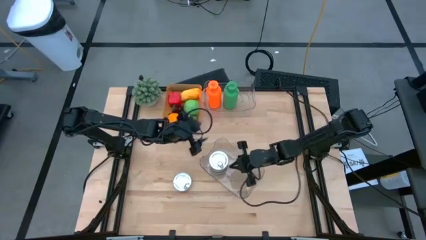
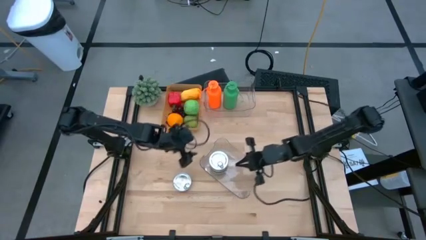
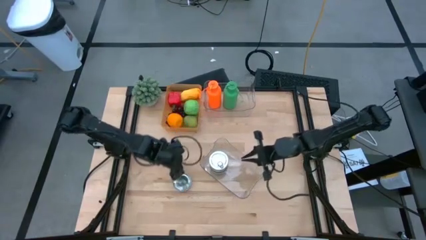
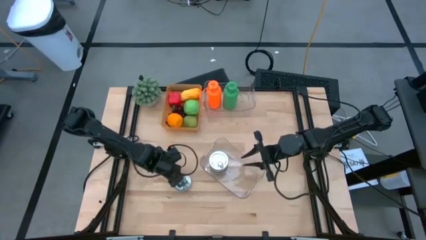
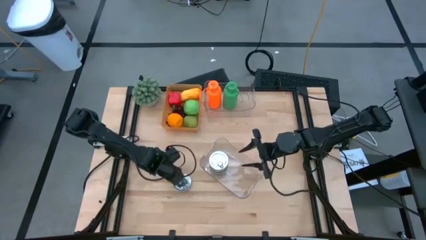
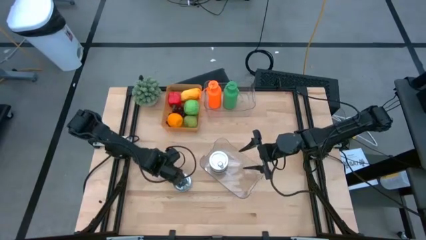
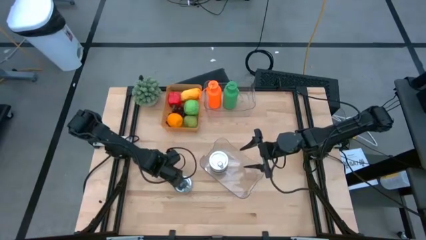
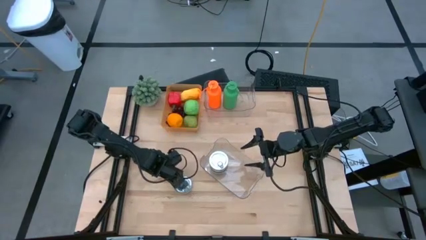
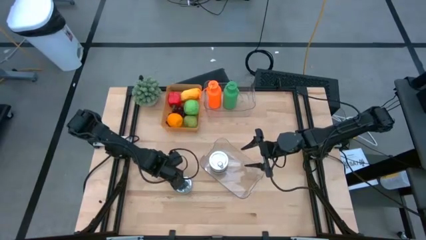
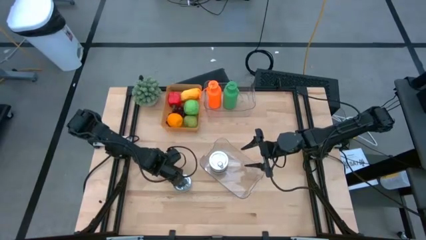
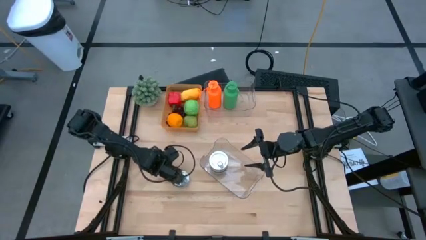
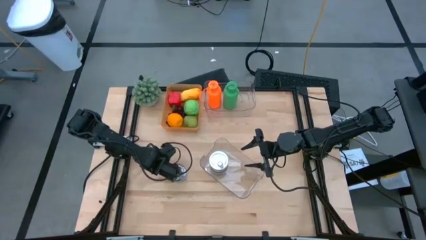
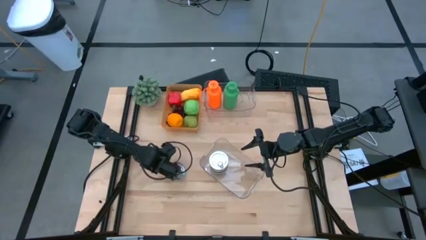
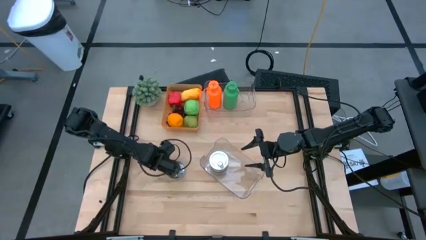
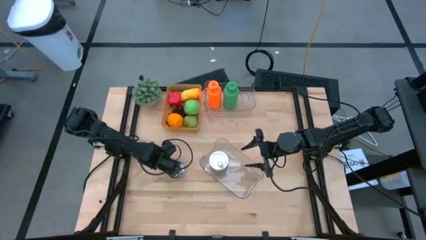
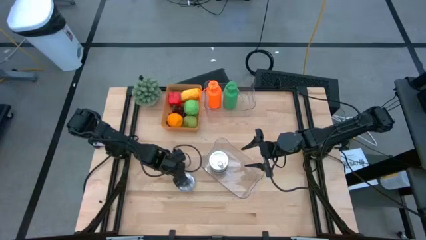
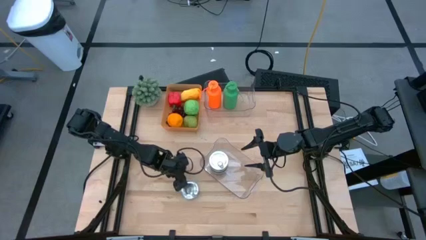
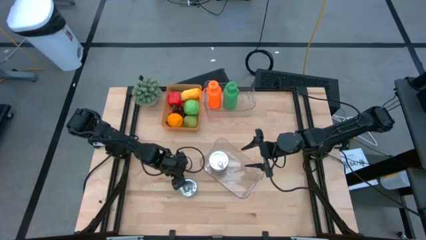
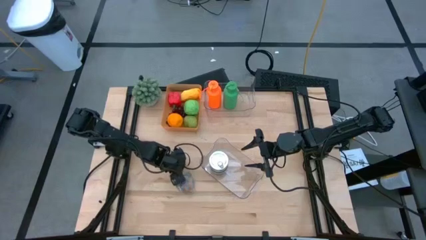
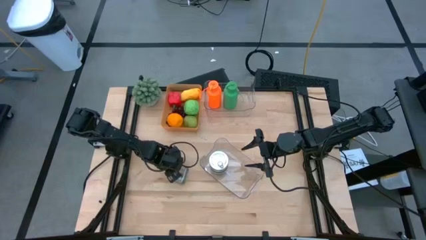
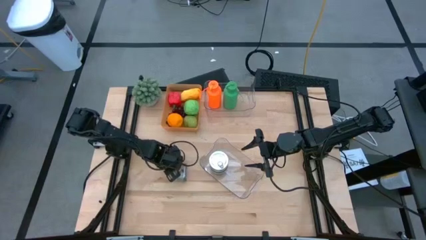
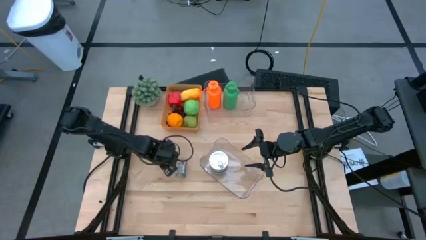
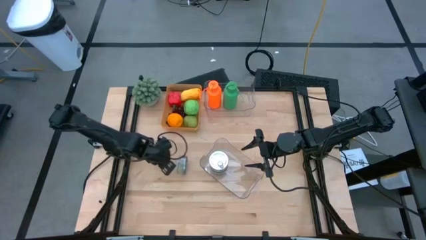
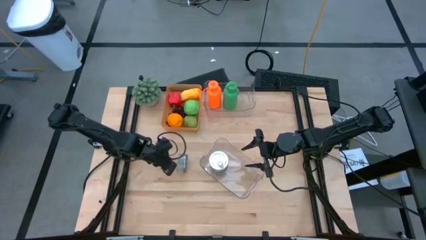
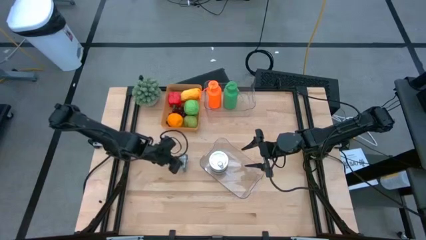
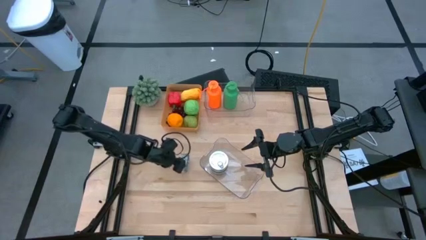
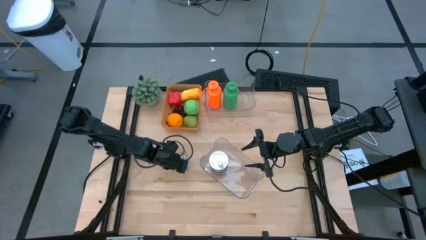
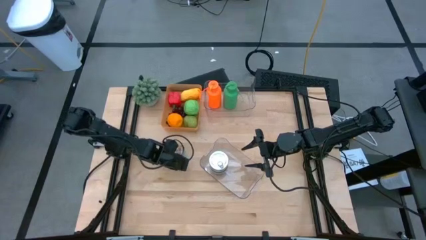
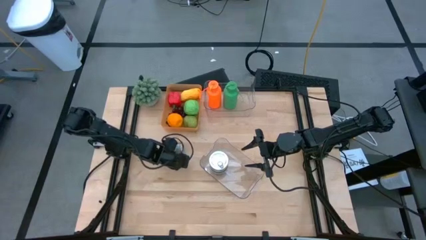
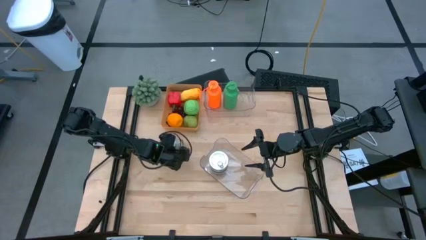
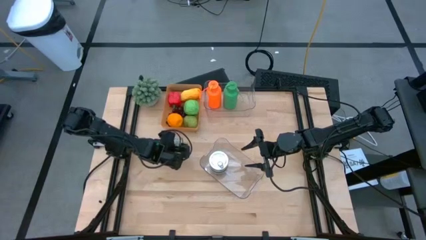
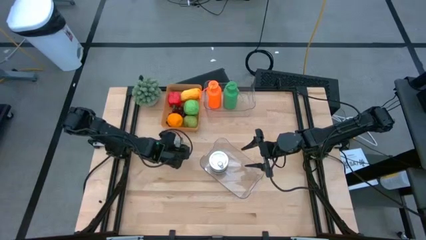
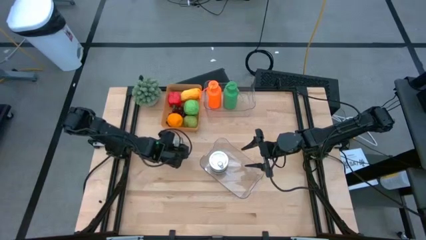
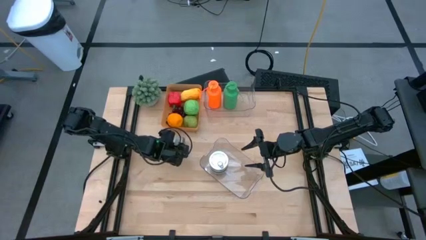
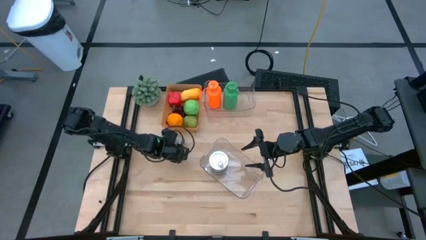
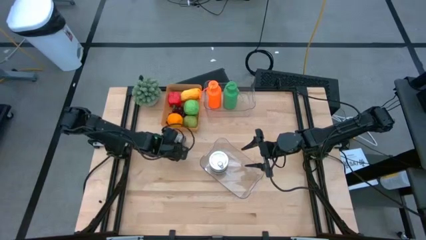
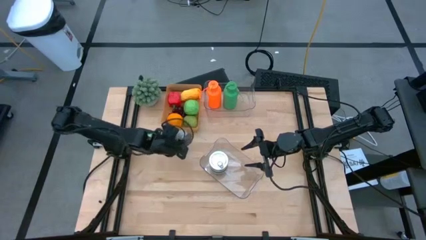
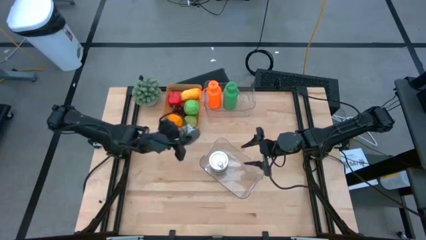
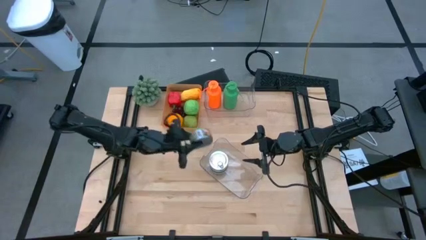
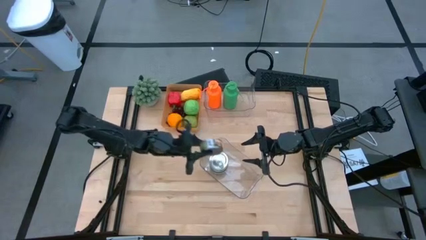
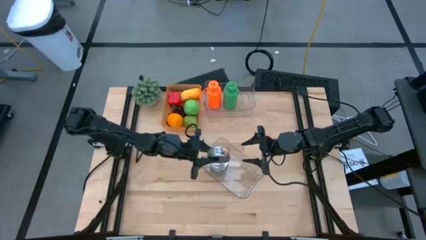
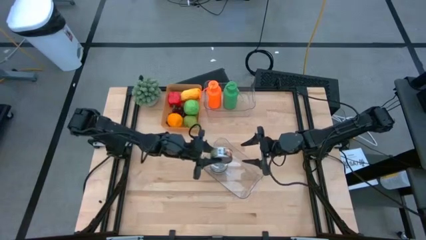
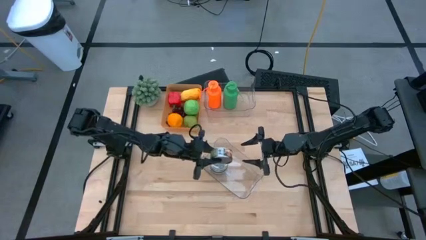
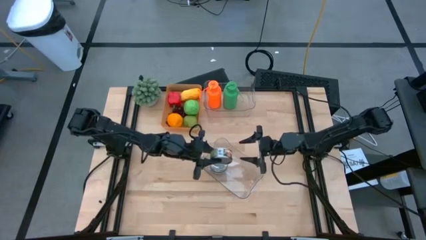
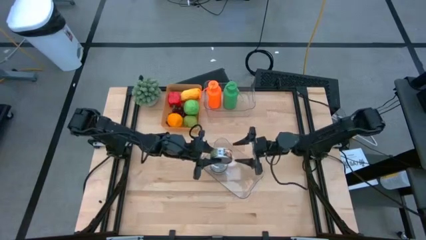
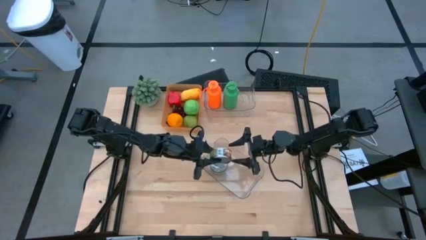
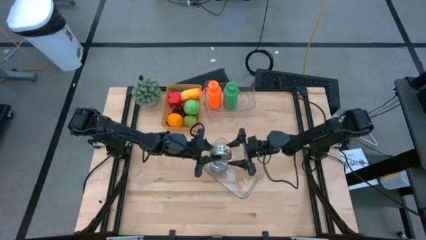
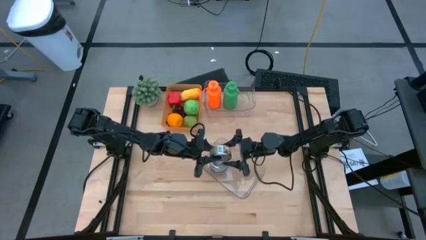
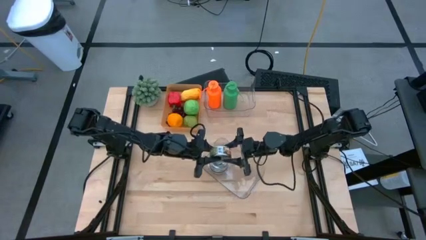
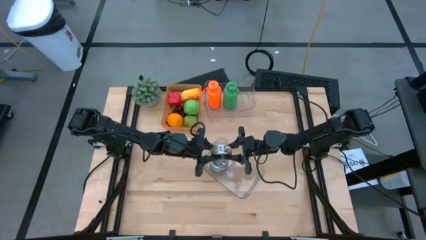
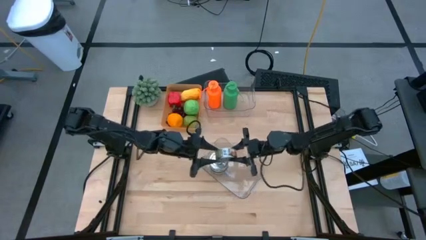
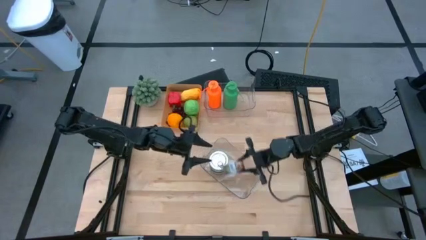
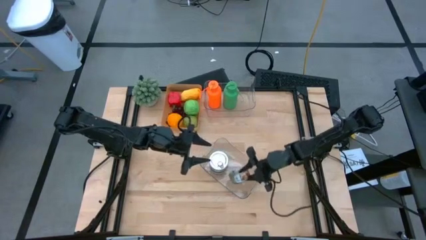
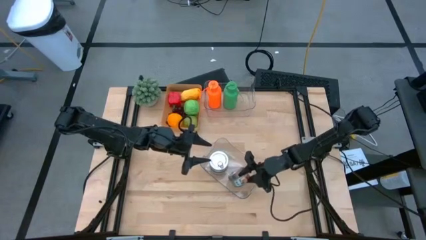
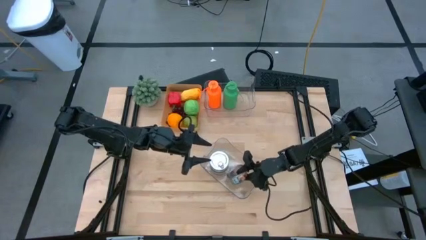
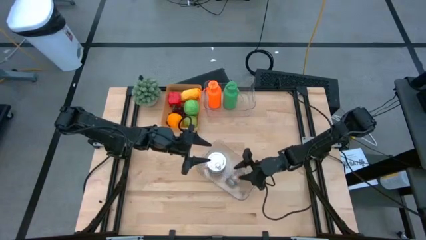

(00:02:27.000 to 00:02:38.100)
Task: Pick & Place Food Item
Put the green tuna can into the bottom transparent bin

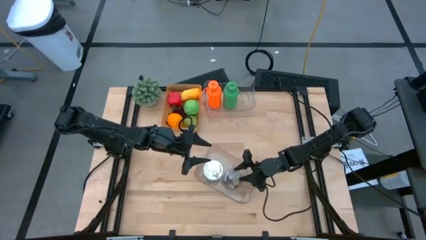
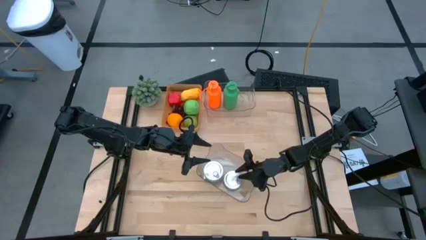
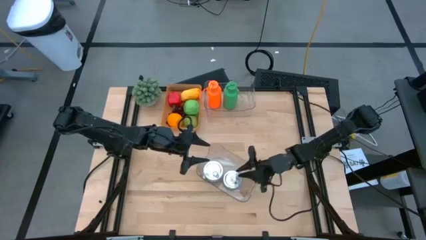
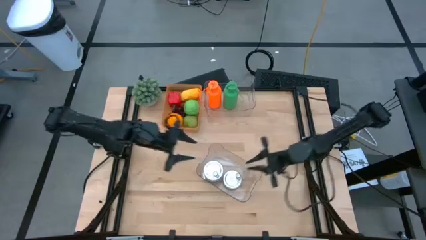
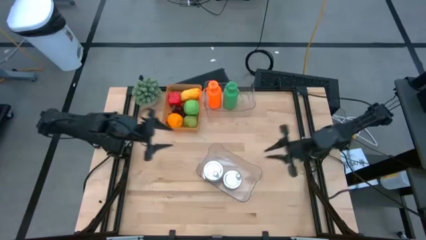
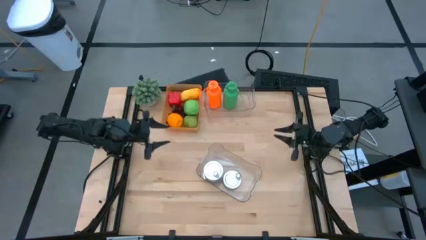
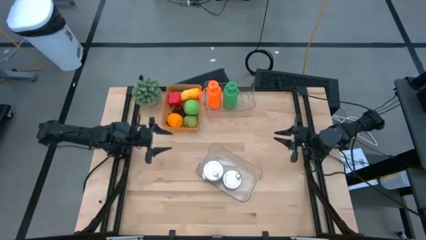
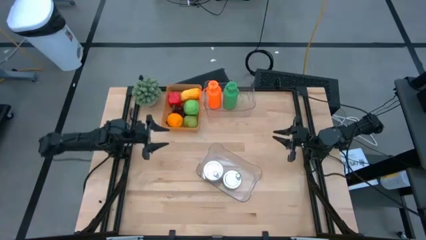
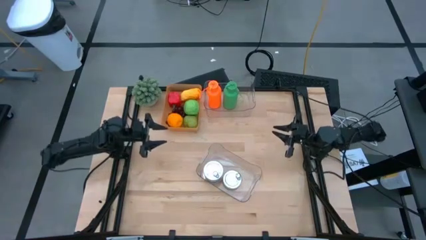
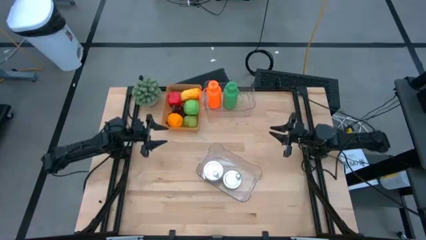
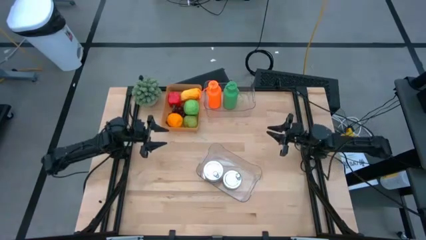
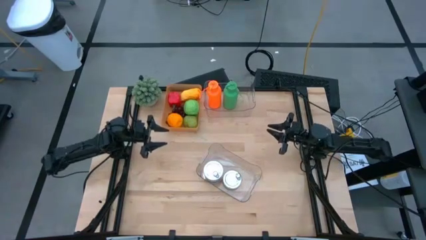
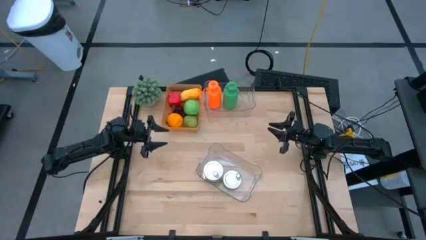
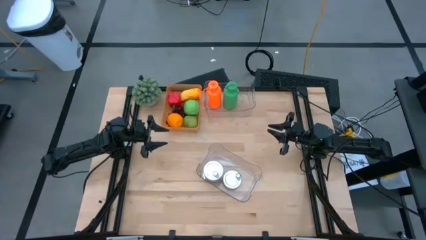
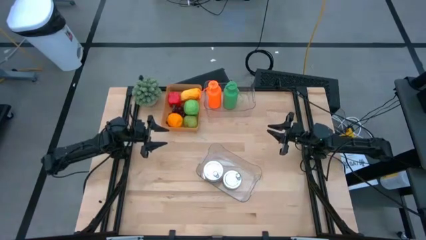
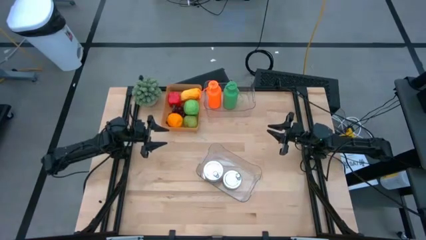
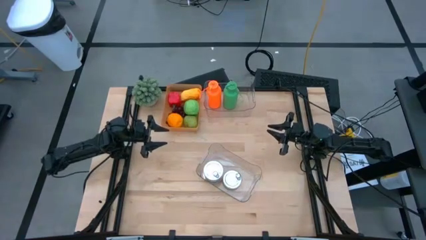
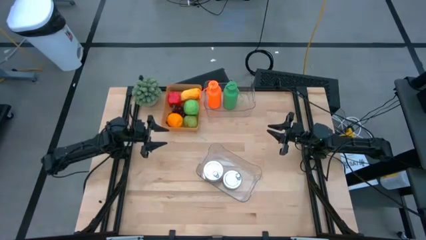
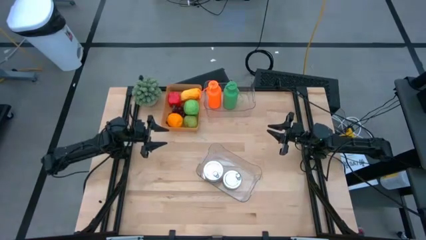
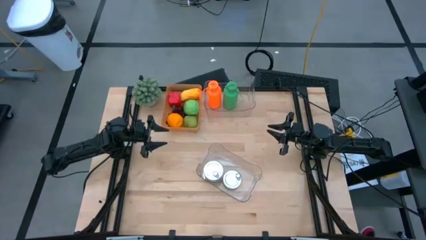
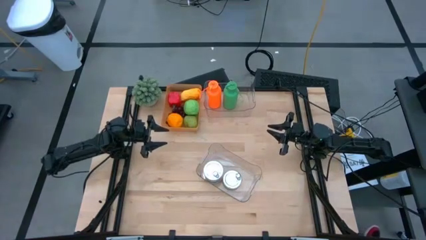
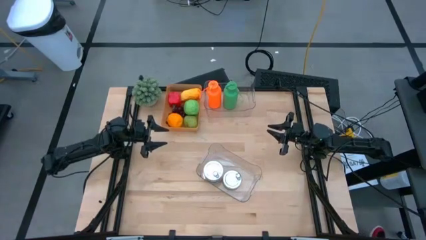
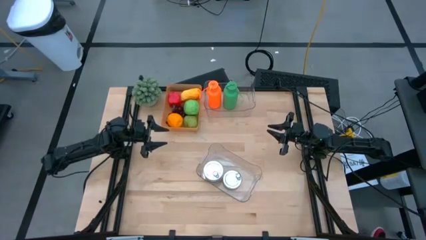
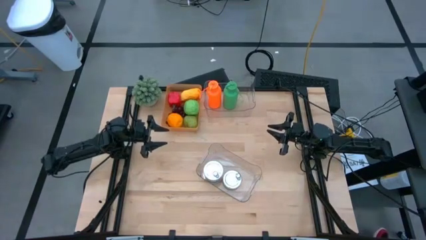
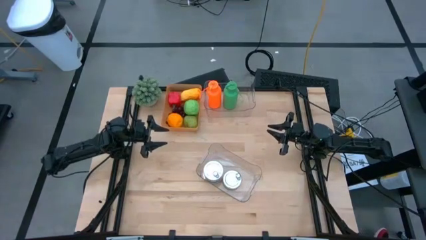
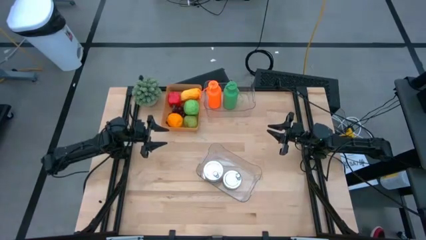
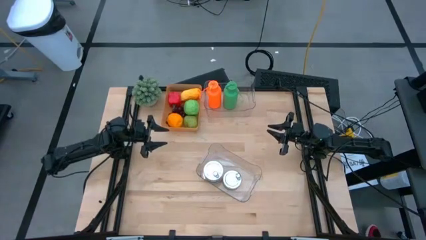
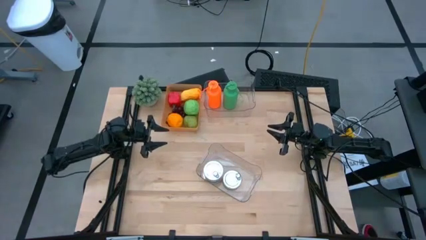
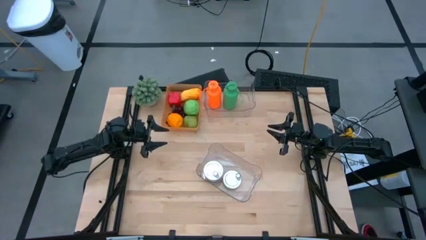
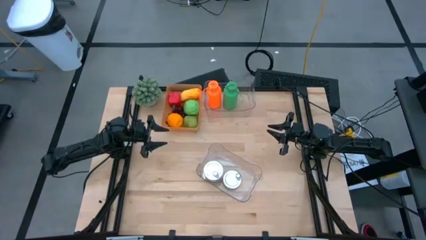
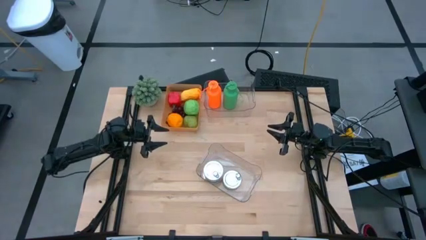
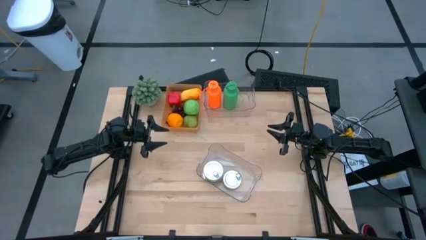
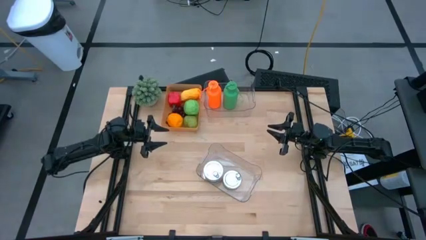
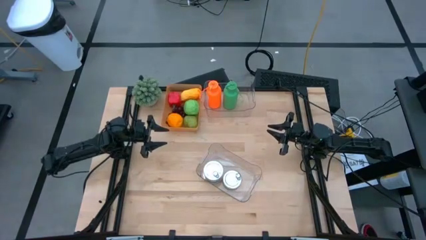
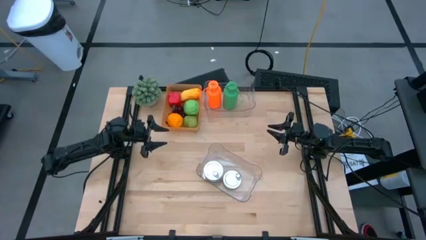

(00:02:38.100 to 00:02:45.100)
Return to Home Position
